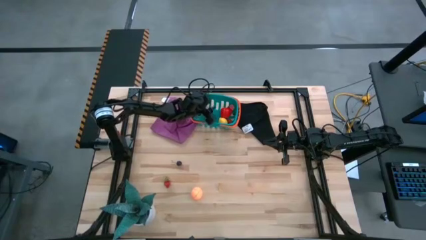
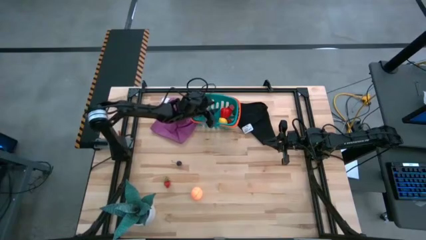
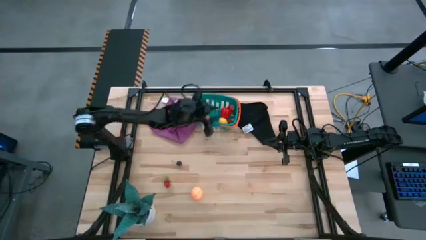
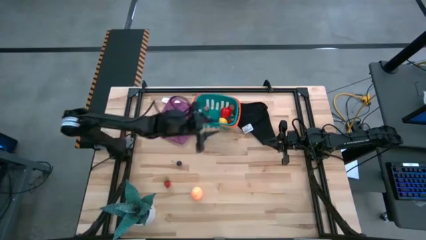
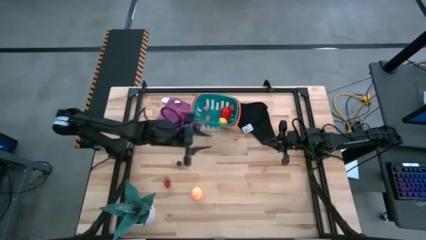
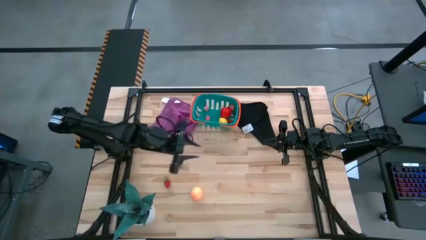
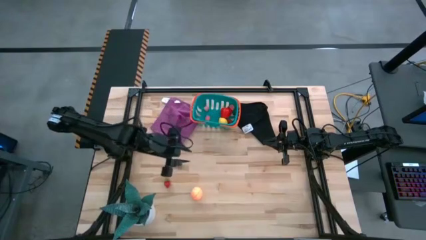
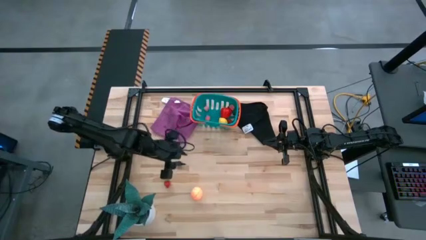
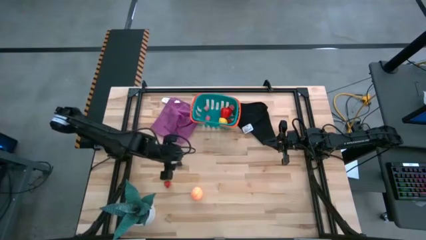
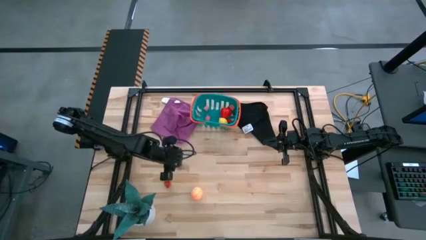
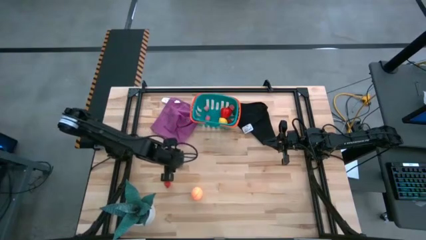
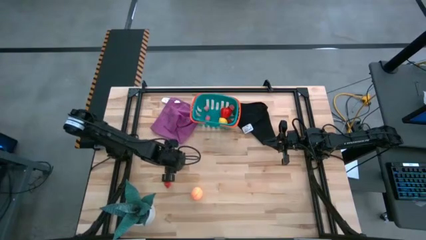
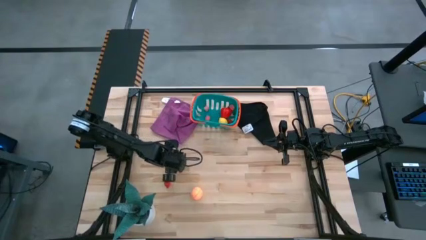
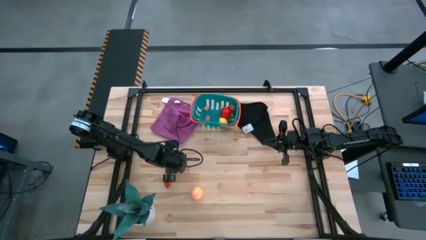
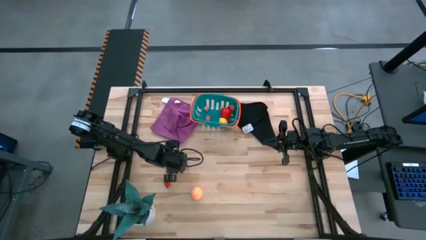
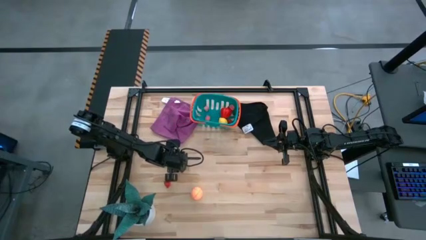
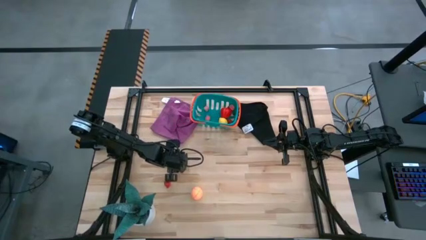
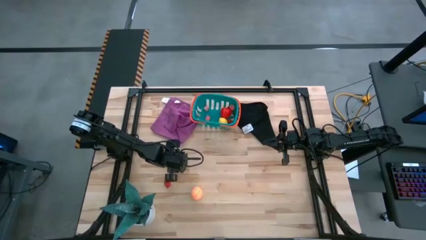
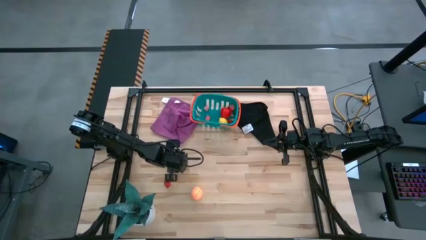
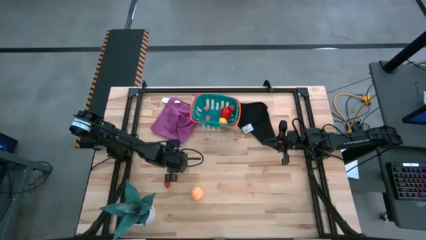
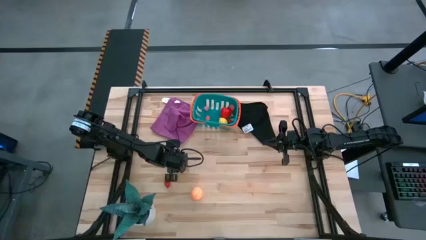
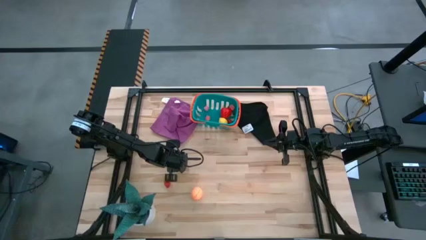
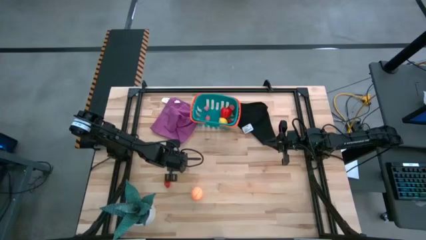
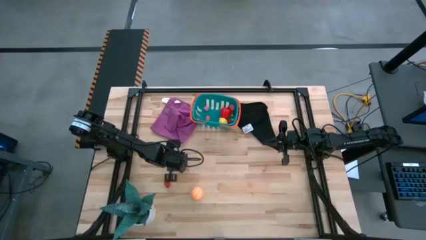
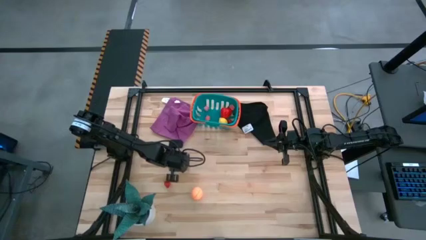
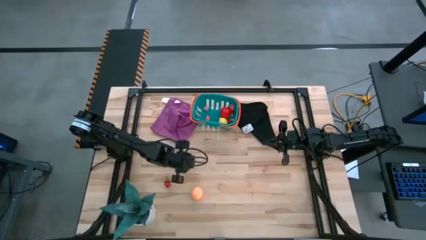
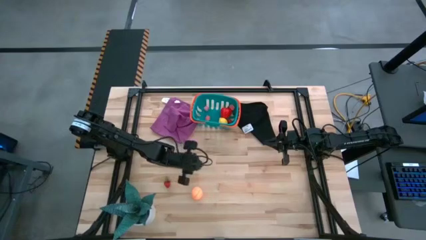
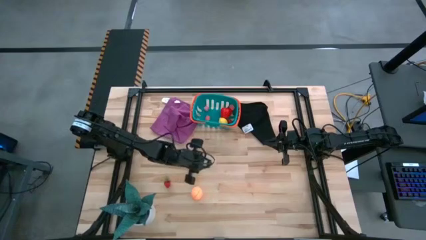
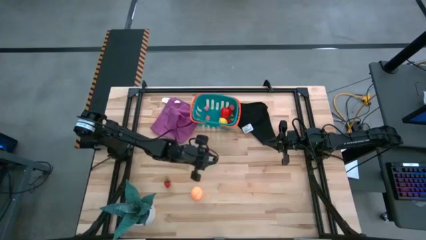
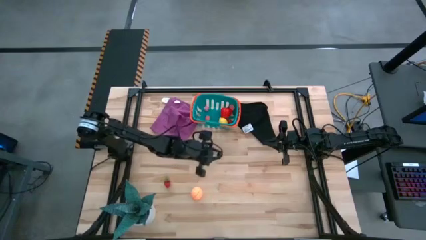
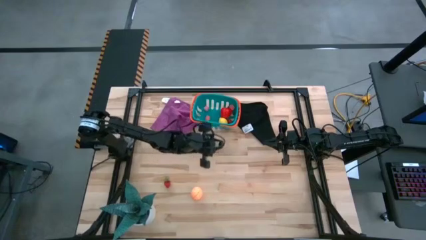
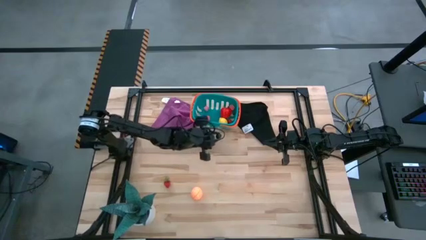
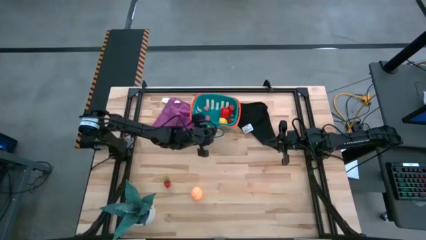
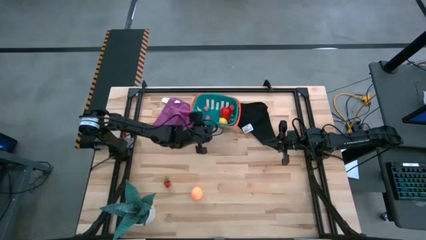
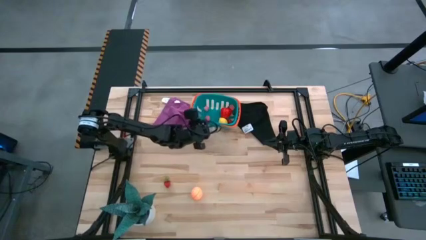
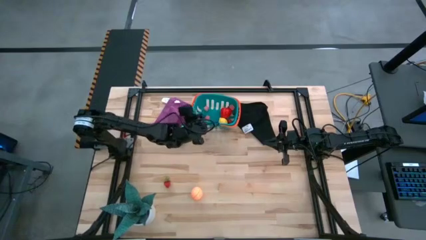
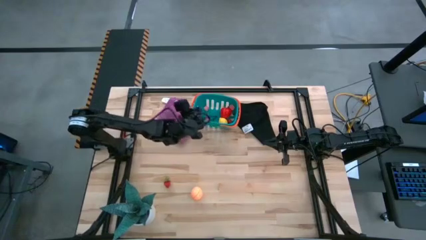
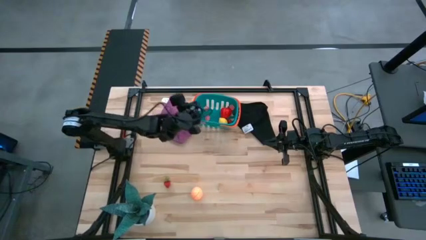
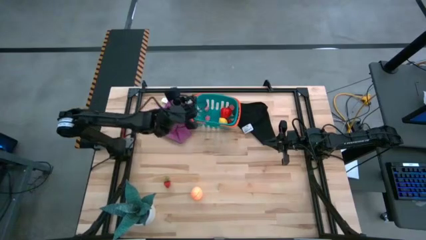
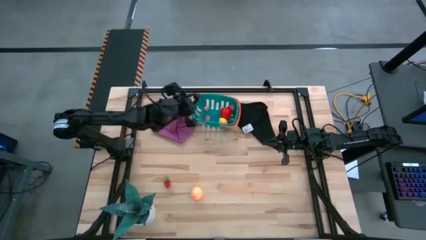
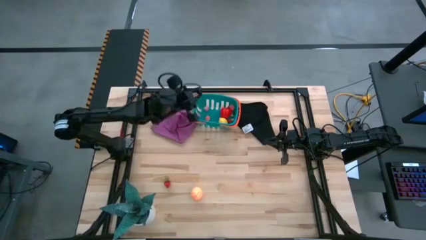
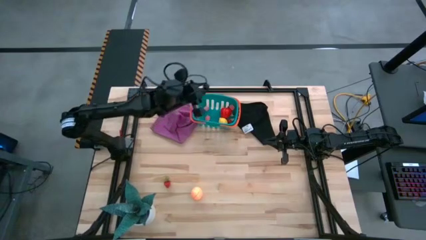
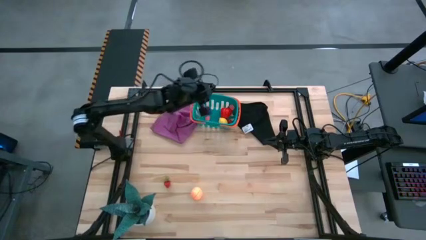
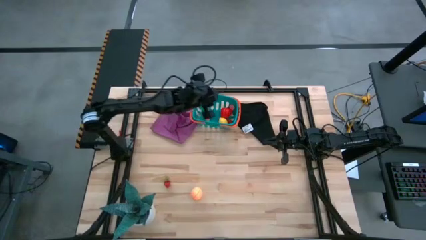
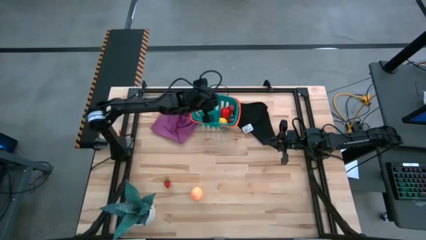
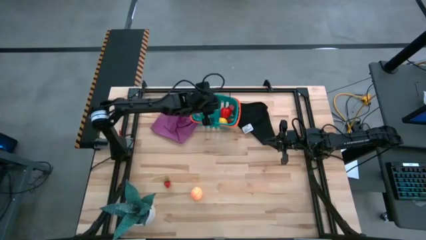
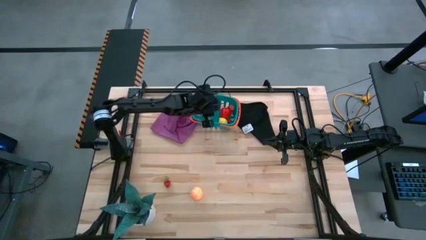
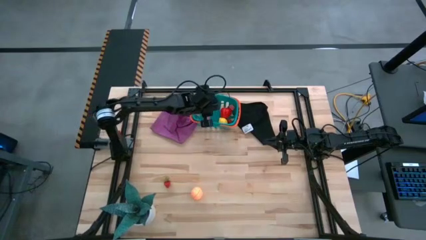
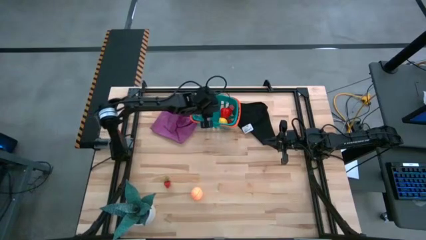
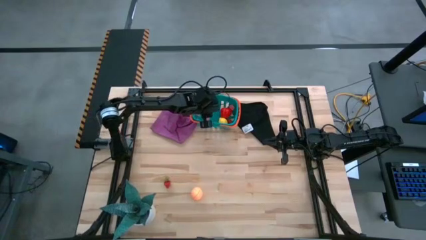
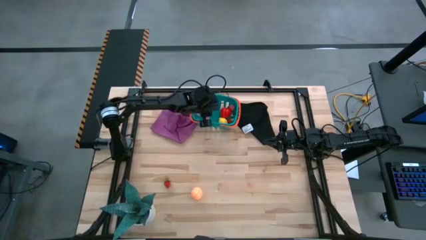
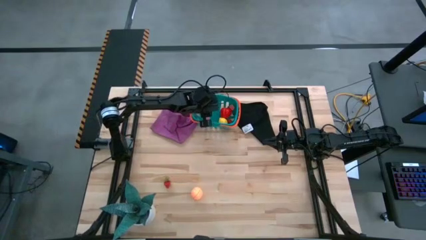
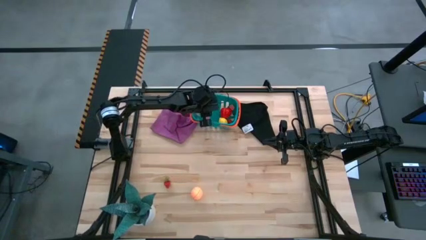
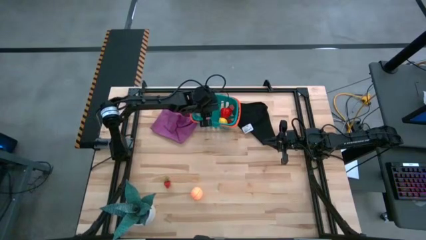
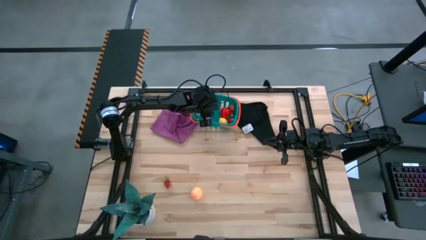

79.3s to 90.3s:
Task: Pick and placing Produce into tupperware
Put the black cherry into the blue bin

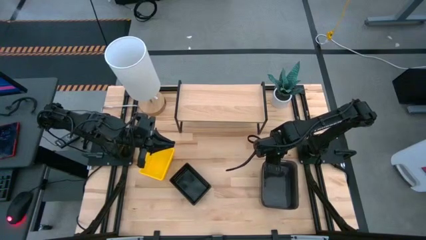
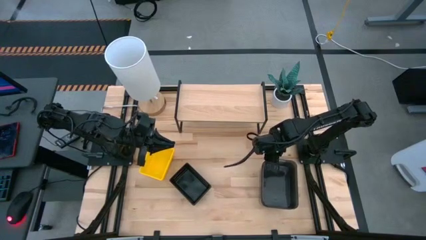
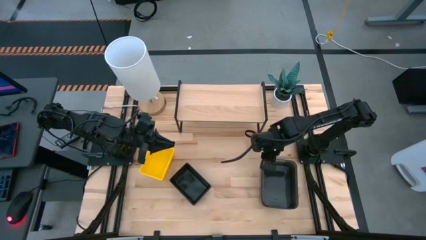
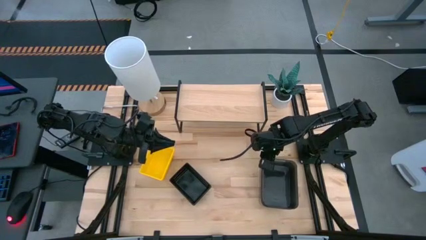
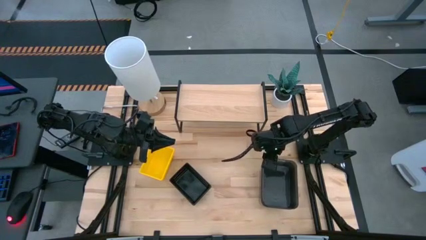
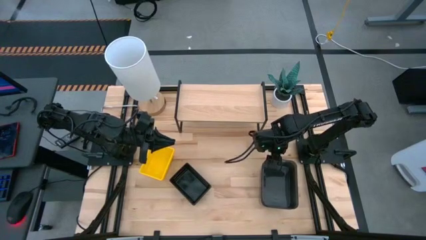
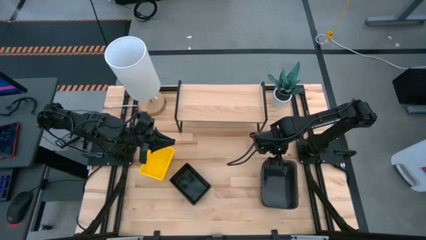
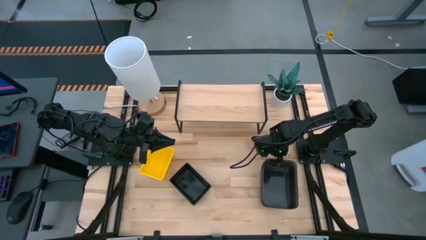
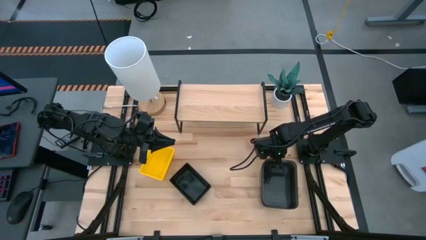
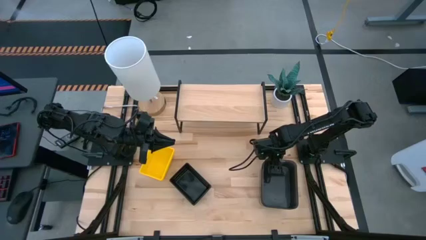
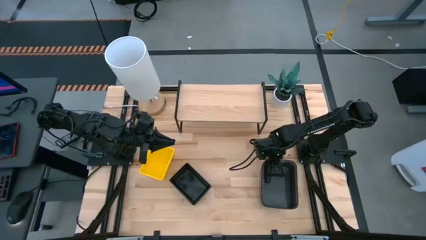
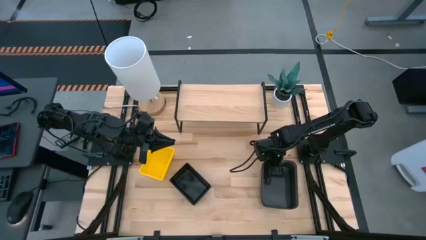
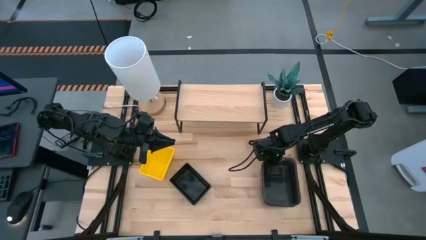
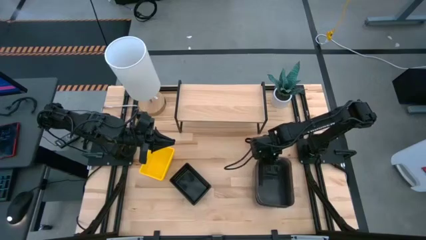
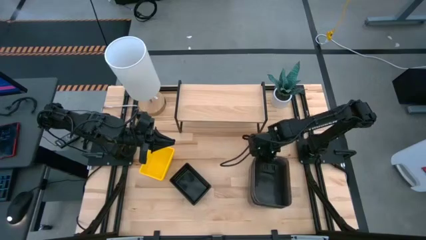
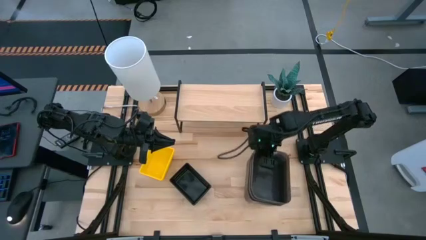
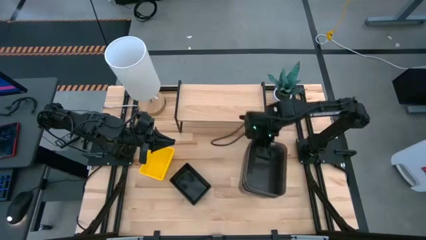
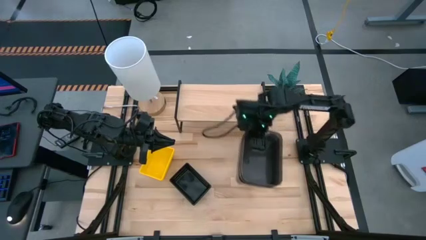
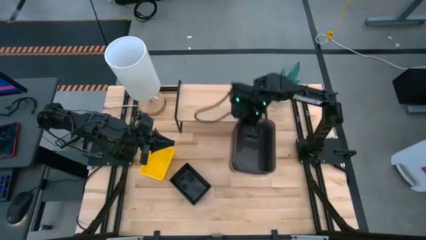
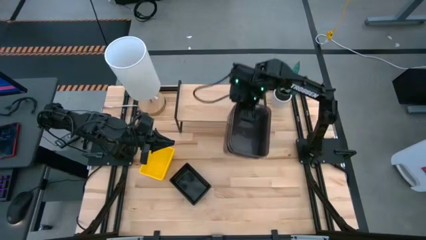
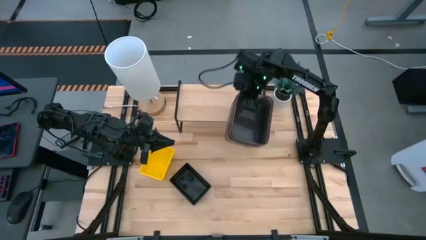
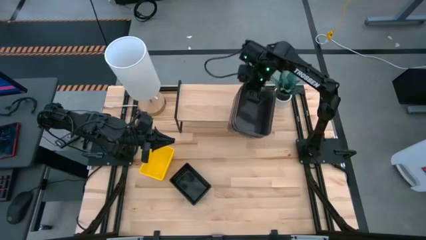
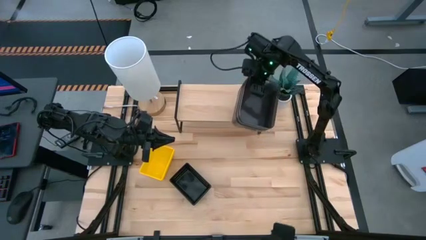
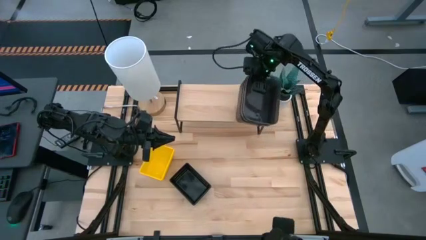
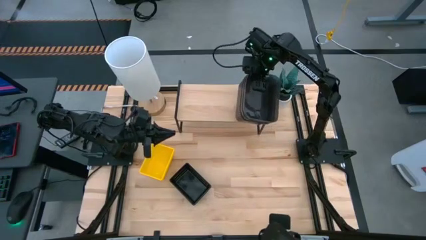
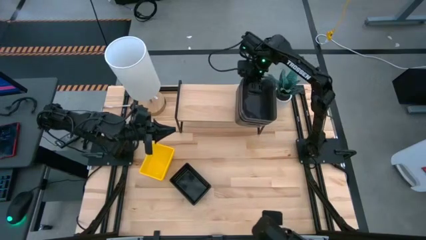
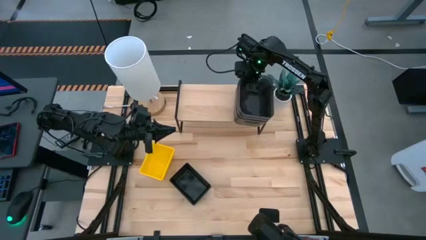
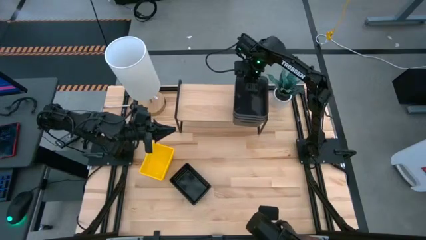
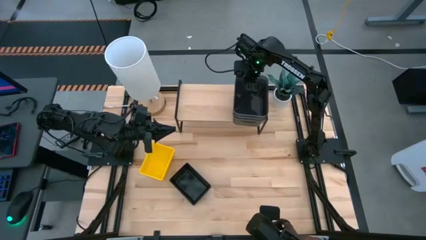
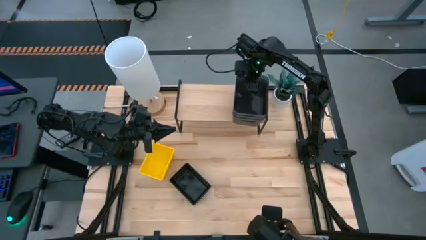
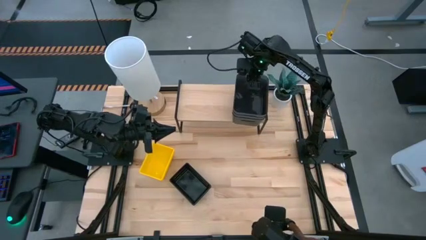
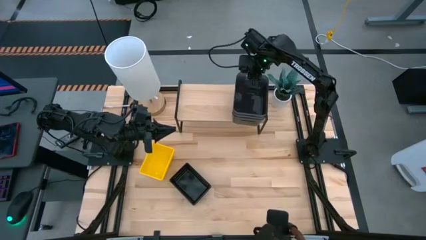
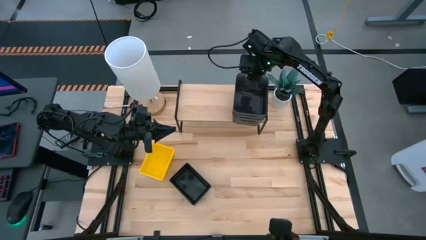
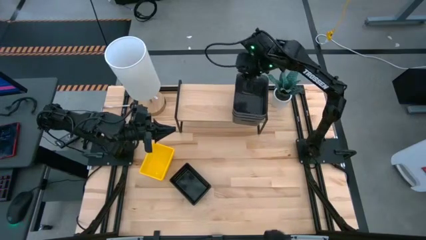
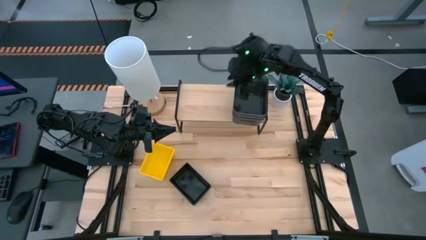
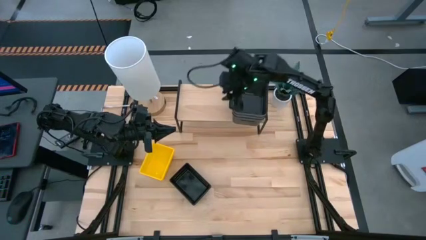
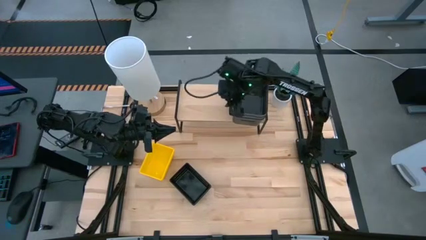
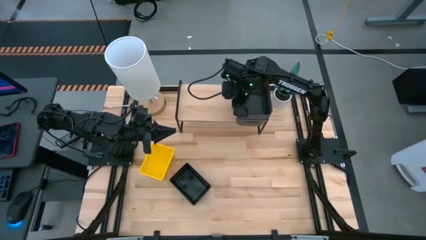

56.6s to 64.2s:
Task: Stack baskets on shelf by color
Put the stacked transparent black bins on the shelf
